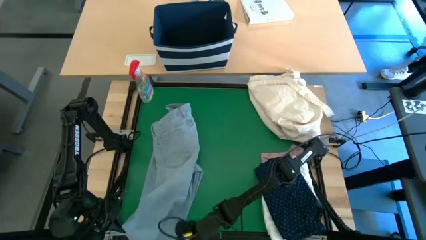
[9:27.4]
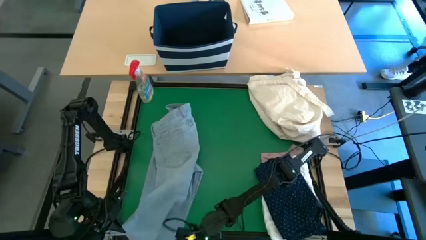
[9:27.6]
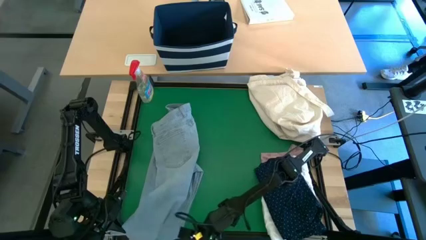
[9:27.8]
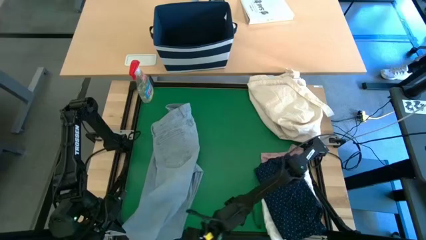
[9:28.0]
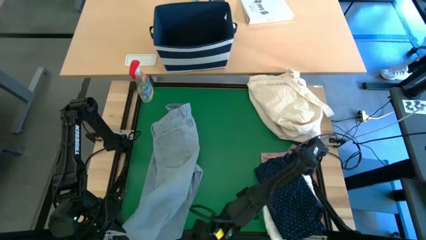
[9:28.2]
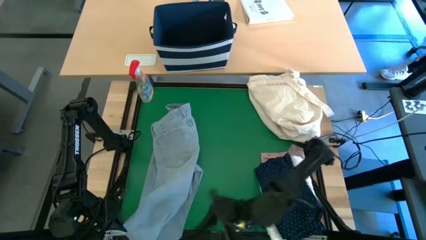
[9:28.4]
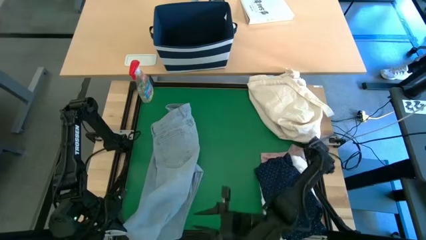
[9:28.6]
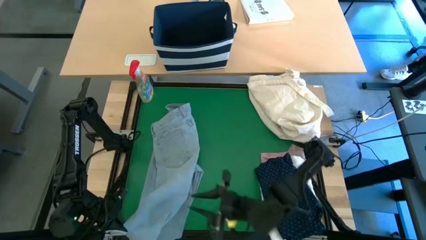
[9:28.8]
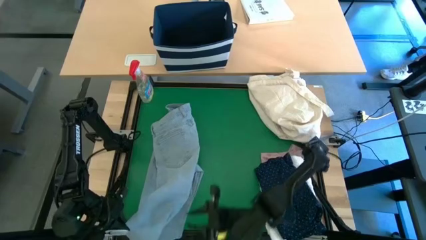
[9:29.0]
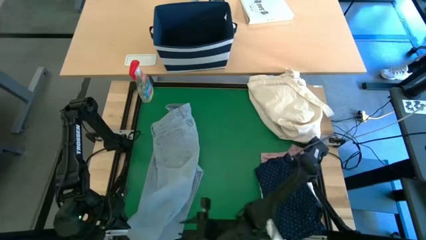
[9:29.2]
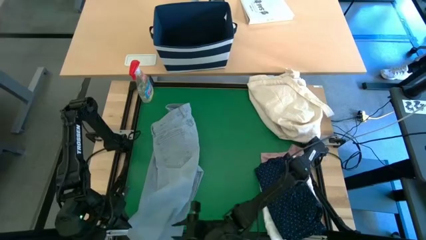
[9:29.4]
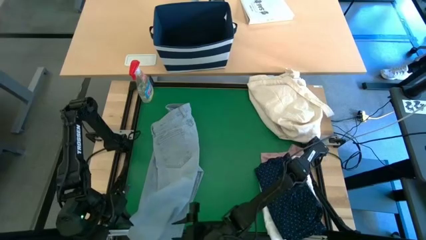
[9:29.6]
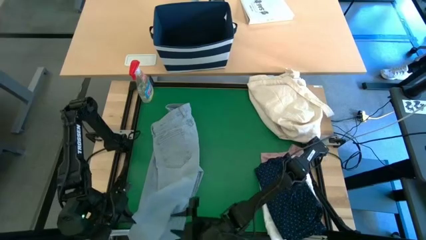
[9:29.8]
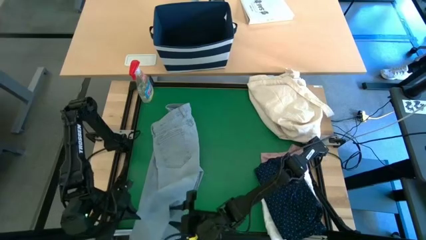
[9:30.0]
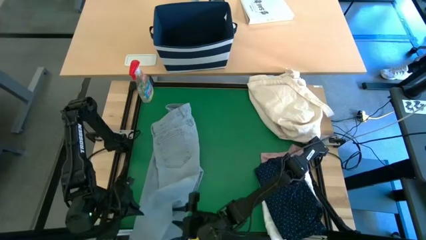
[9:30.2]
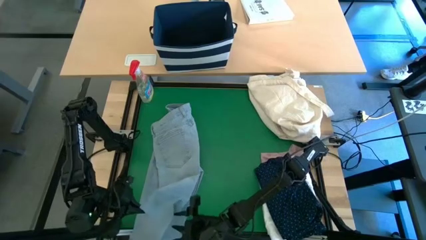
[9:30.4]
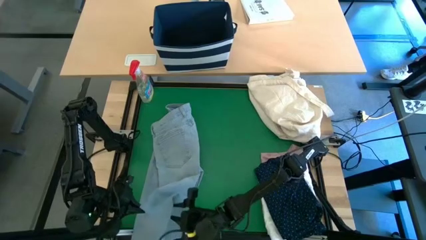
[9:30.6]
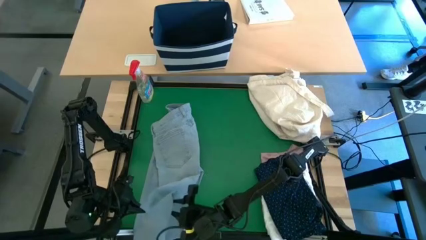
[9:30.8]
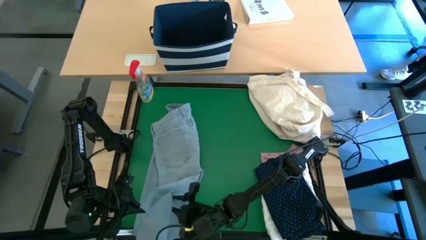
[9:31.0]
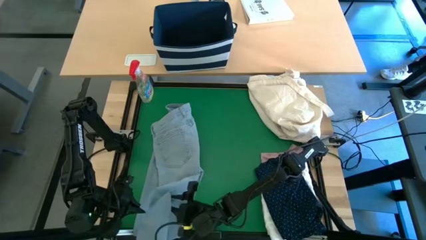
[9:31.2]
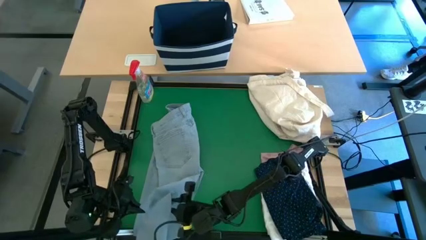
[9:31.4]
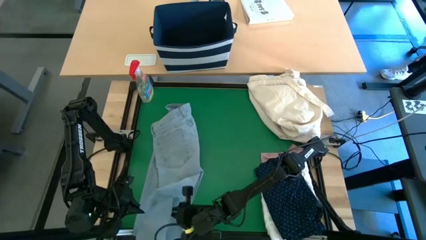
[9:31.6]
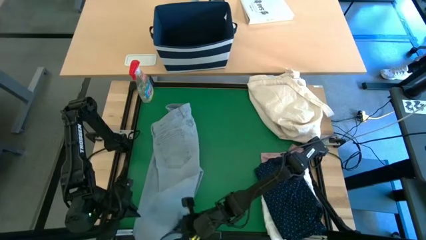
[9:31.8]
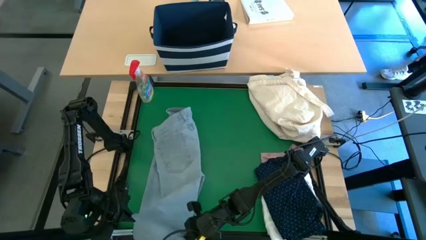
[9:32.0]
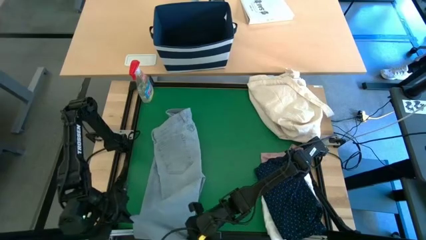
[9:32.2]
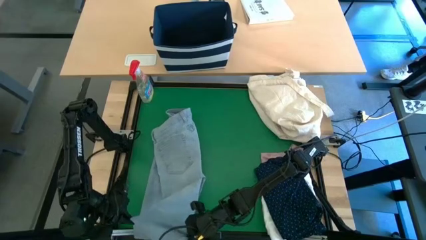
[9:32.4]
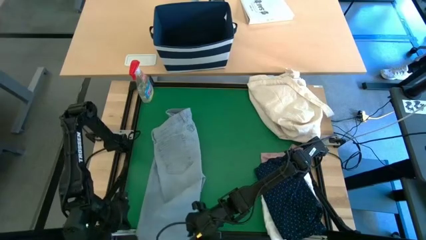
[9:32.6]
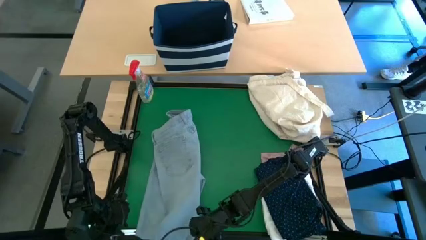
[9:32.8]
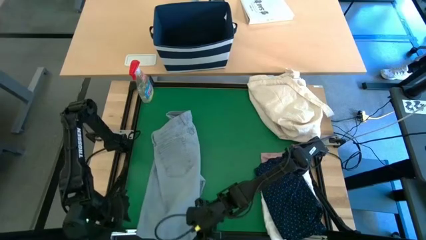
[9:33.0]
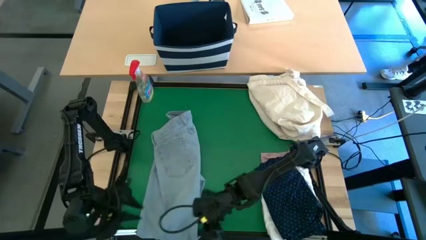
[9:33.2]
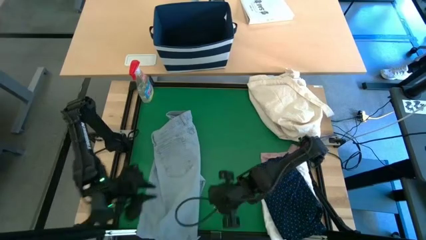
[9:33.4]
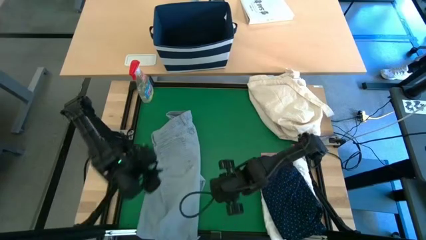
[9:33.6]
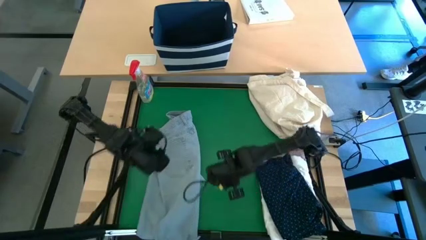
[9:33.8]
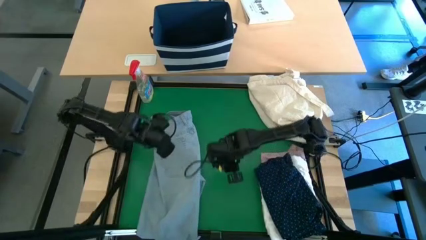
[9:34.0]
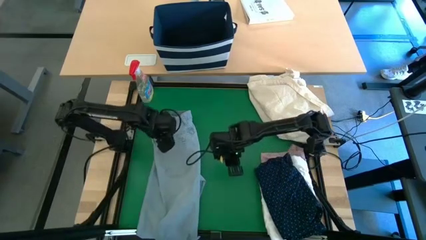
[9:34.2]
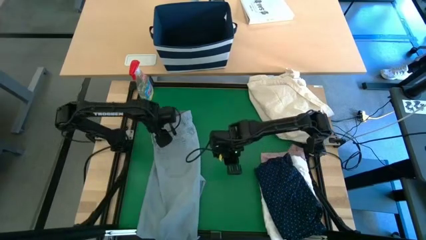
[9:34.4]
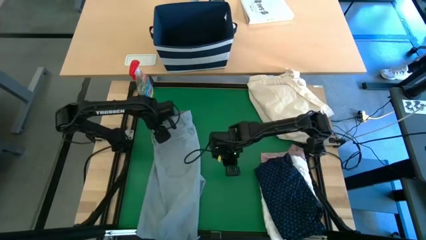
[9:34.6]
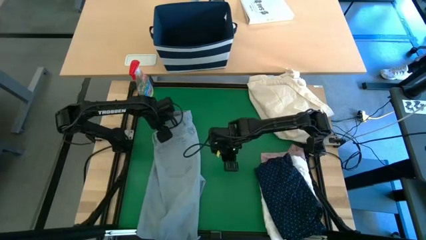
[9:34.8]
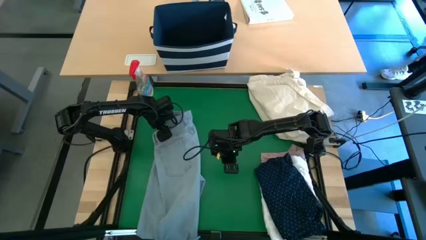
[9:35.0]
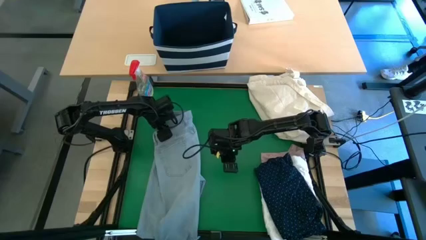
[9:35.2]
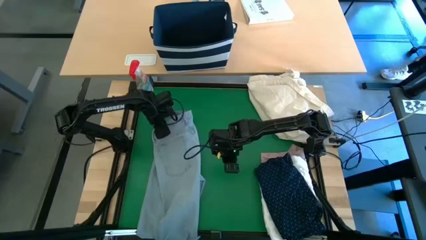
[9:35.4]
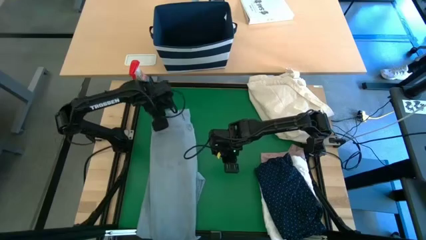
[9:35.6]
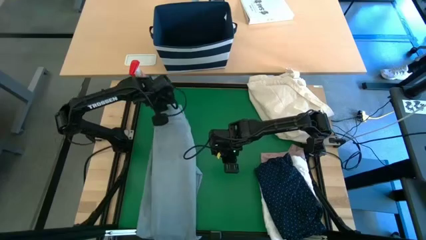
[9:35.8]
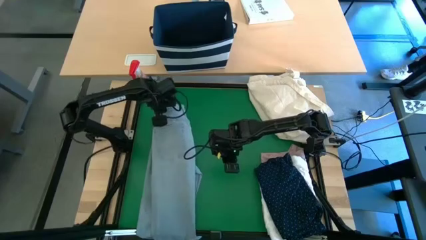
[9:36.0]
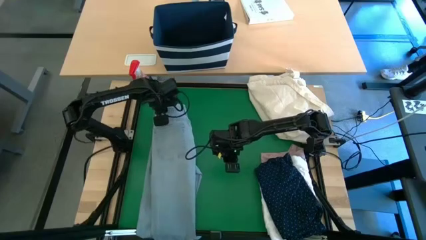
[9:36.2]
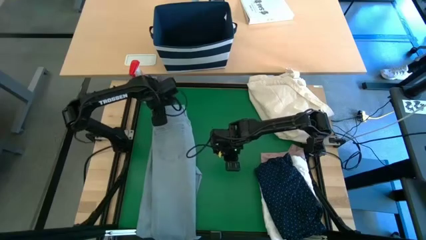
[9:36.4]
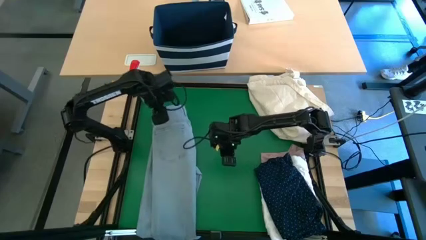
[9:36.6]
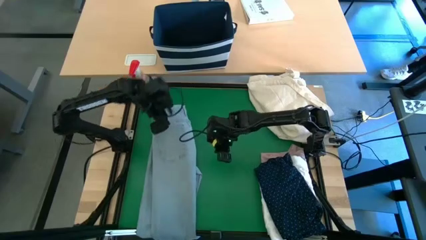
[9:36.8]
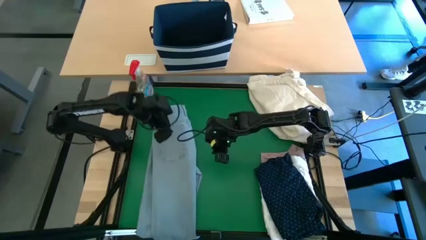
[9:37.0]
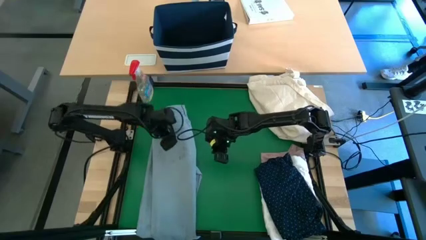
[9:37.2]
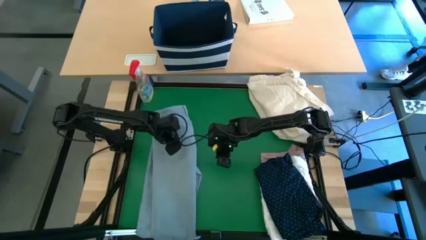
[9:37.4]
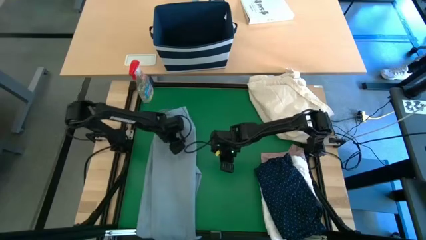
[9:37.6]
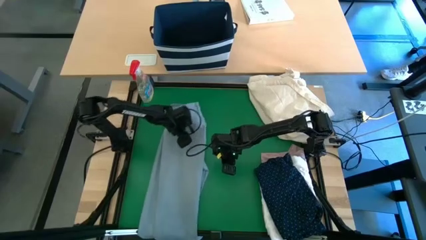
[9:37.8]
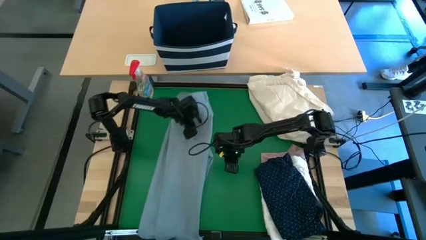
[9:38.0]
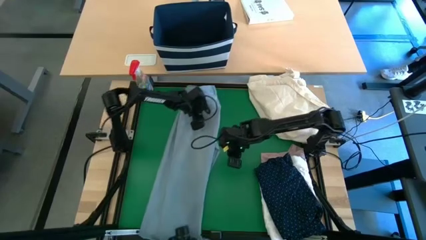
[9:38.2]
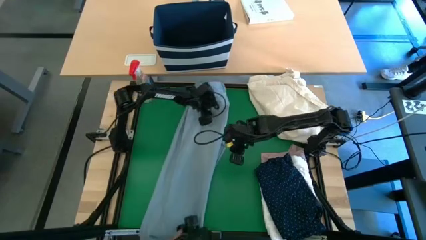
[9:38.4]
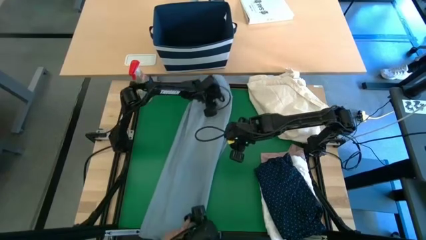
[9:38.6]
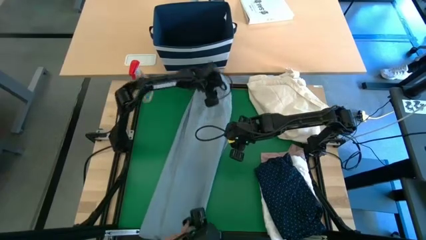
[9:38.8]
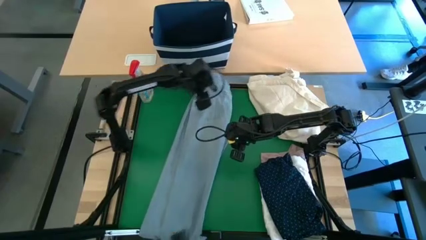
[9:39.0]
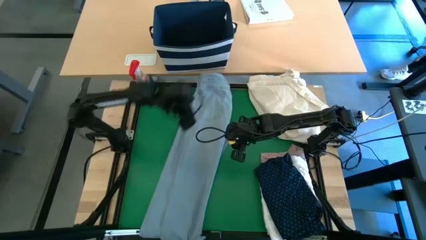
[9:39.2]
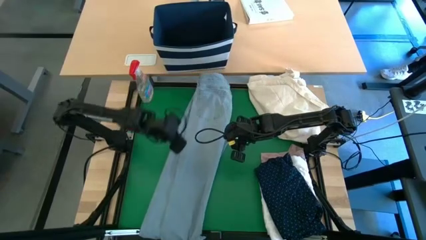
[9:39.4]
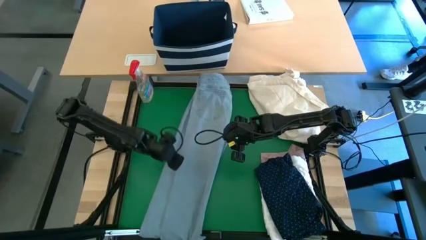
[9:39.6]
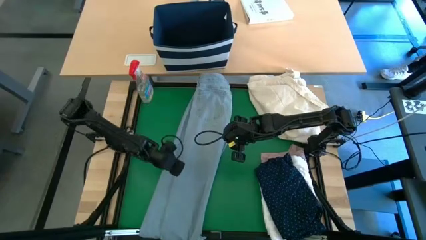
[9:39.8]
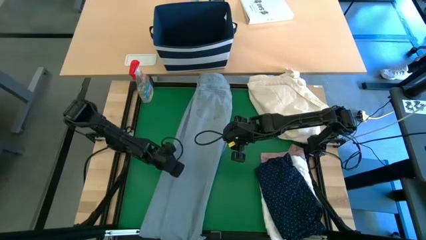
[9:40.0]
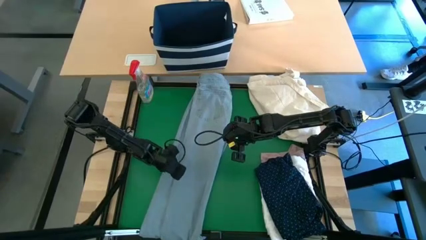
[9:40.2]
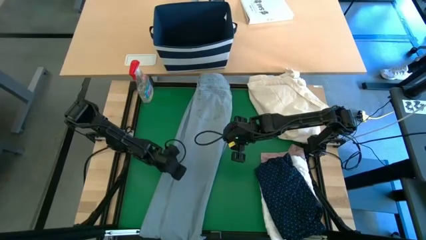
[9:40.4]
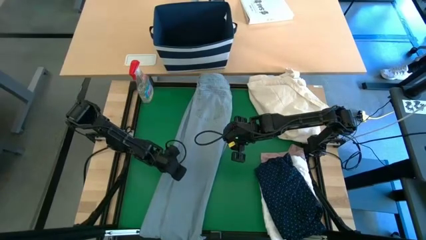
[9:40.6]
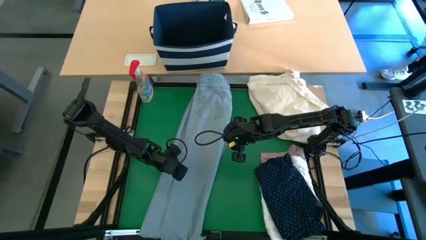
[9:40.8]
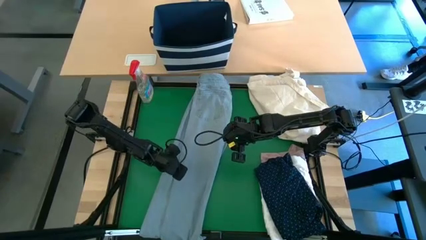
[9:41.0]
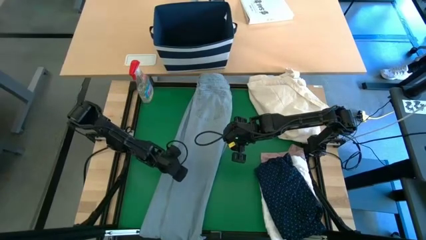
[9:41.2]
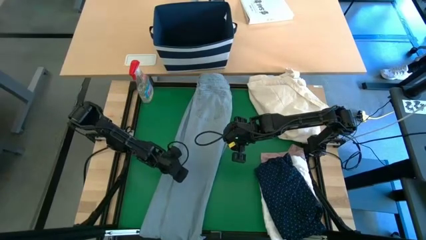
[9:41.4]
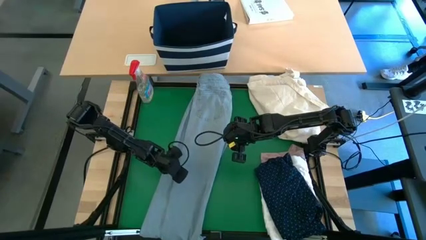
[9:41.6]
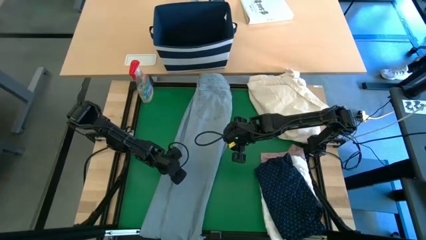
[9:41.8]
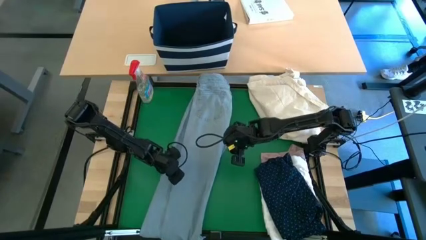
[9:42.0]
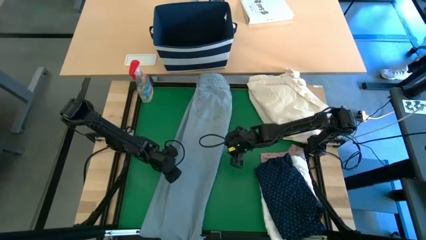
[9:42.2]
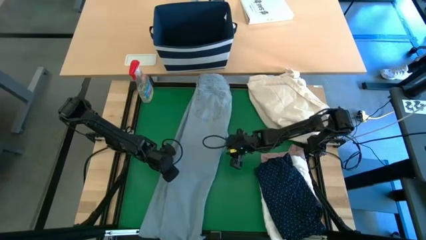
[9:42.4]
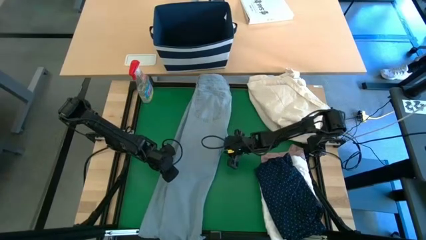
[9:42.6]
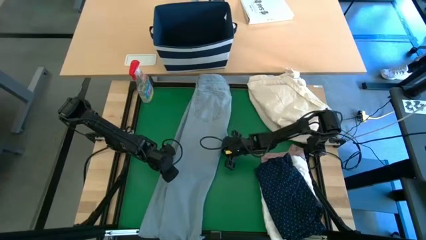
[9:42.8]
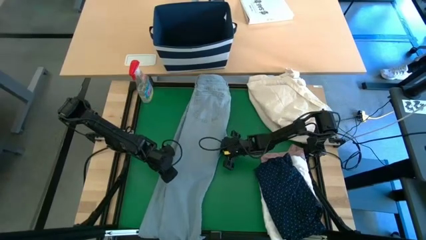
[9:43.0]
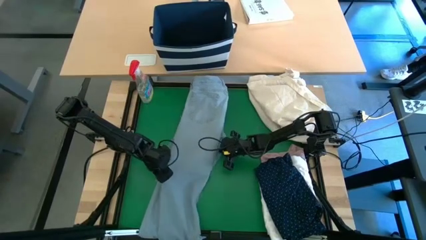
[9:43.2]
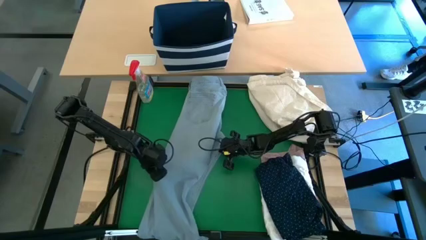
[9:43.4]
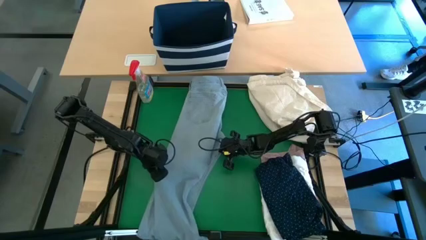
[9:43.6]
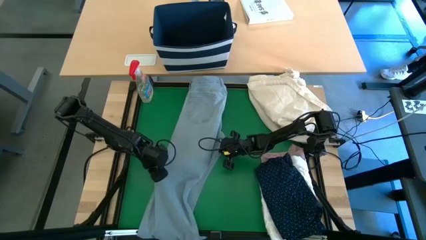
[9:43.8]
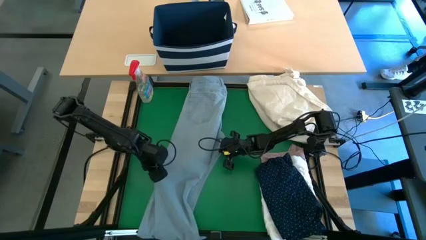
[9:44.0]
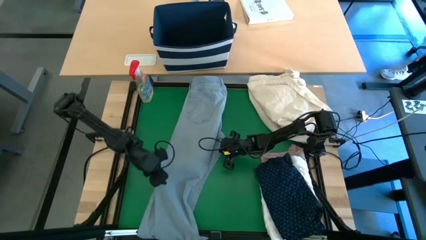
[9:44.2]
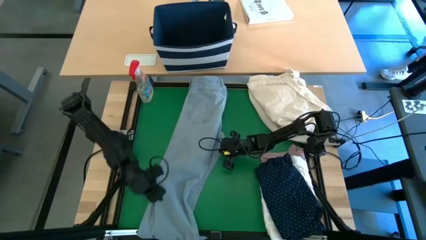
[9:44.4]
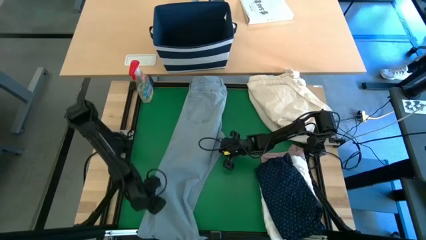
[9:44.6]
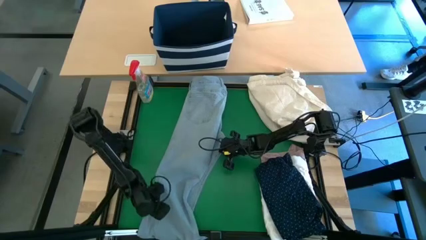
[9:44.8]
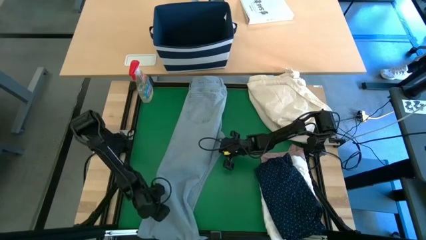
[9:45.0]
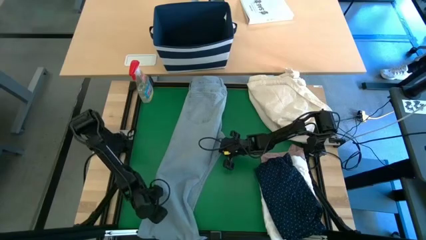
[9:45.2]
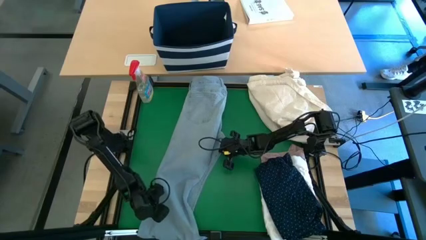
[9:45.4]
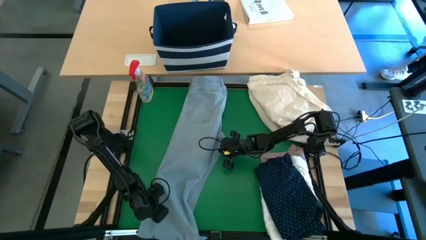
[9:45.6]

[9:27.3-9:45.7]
Task: Fold laundry
Fold the blue jeans
